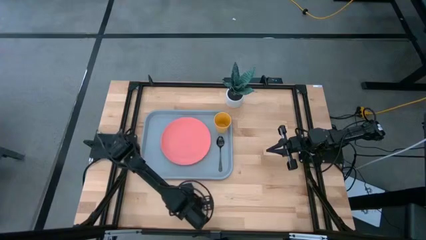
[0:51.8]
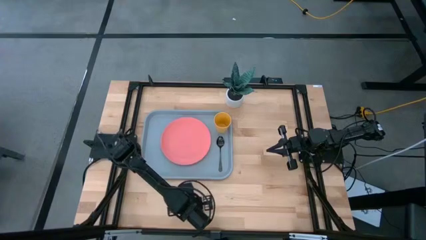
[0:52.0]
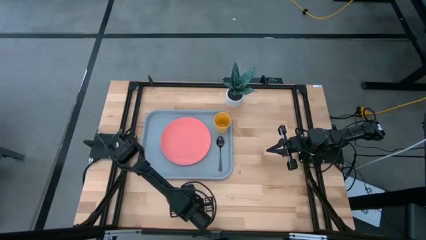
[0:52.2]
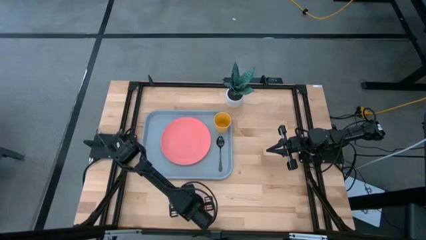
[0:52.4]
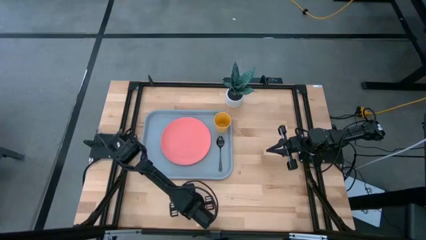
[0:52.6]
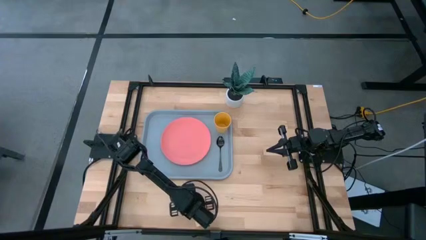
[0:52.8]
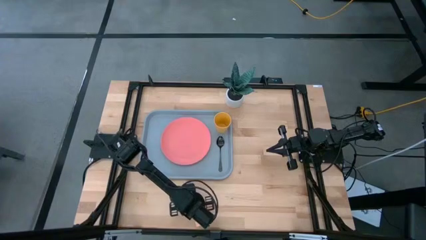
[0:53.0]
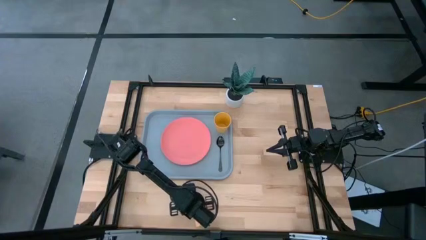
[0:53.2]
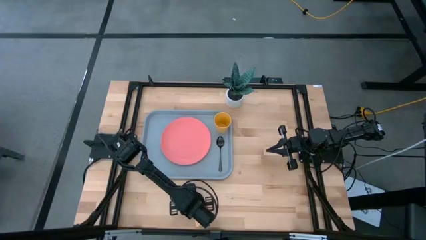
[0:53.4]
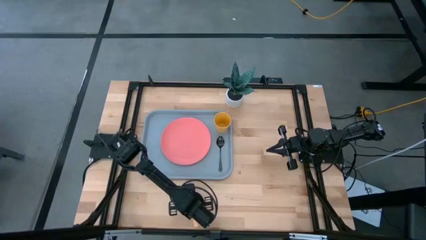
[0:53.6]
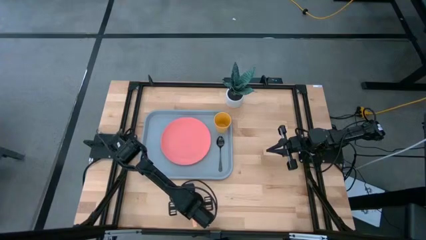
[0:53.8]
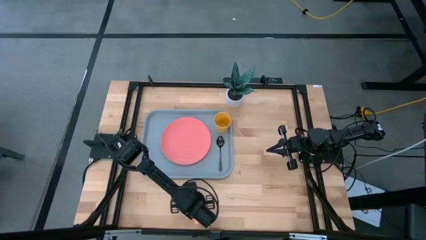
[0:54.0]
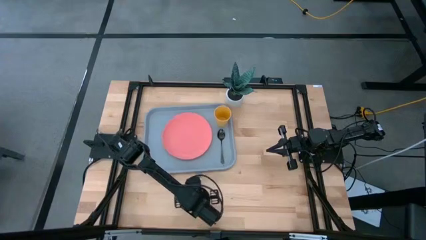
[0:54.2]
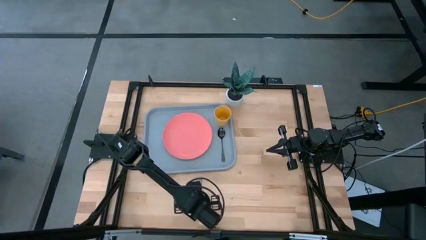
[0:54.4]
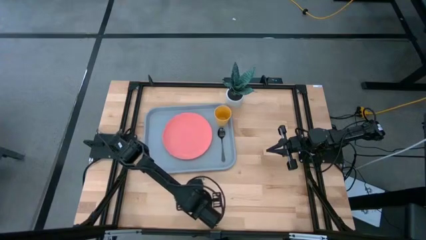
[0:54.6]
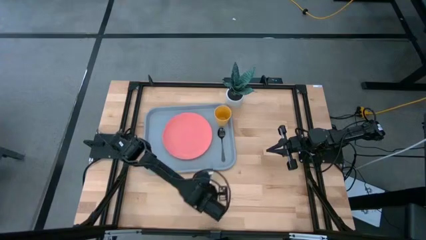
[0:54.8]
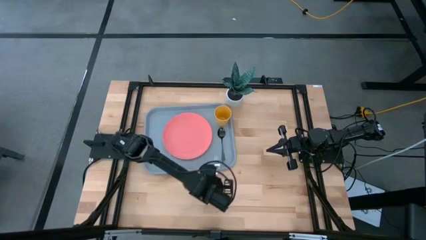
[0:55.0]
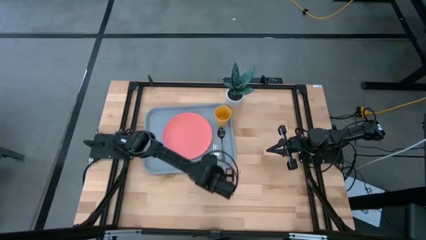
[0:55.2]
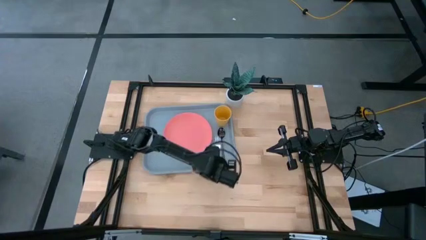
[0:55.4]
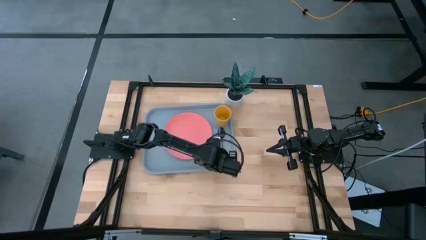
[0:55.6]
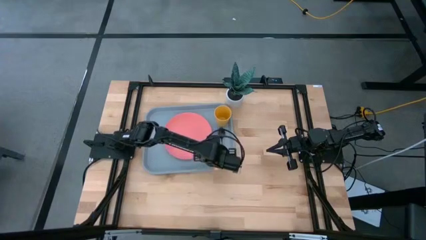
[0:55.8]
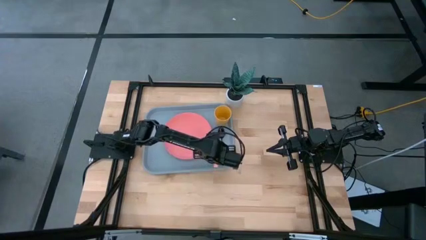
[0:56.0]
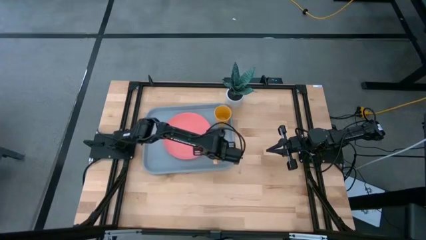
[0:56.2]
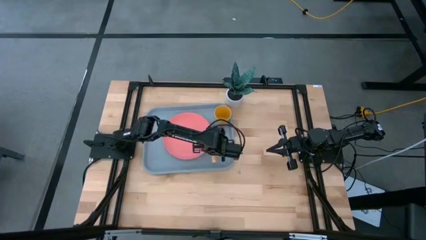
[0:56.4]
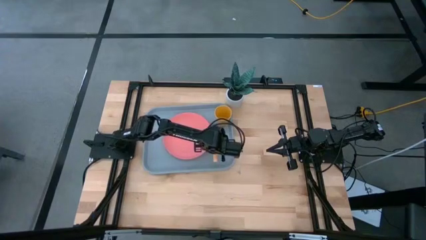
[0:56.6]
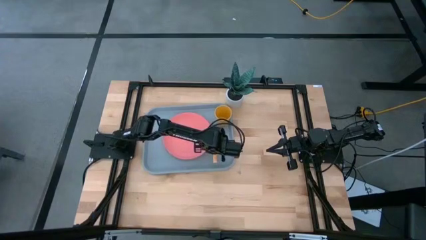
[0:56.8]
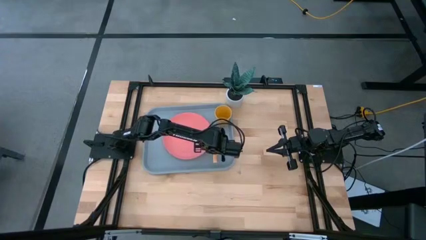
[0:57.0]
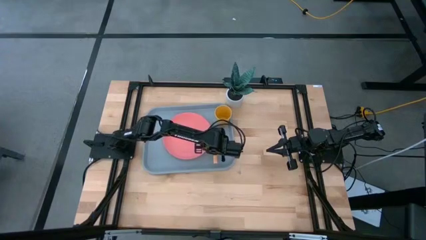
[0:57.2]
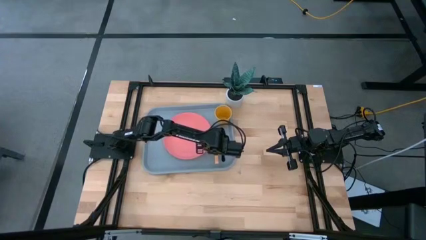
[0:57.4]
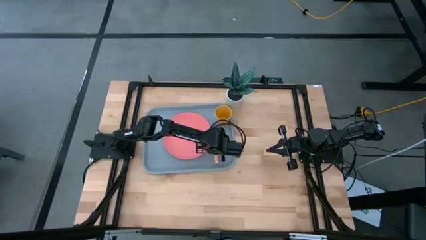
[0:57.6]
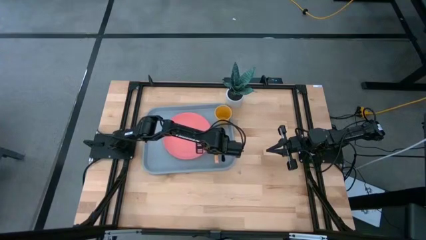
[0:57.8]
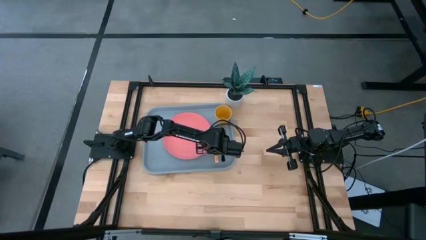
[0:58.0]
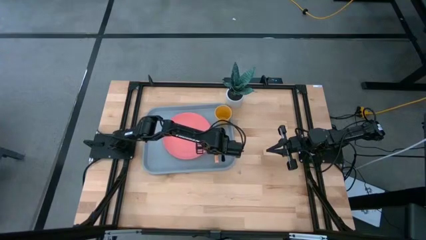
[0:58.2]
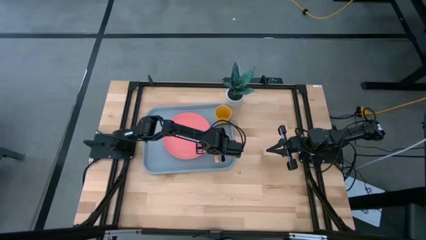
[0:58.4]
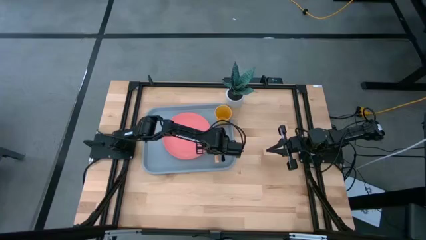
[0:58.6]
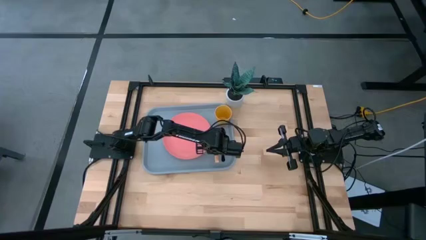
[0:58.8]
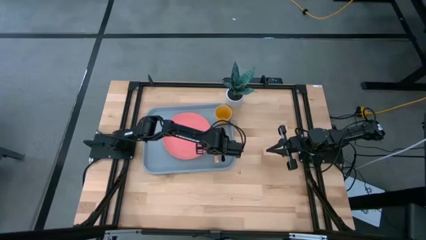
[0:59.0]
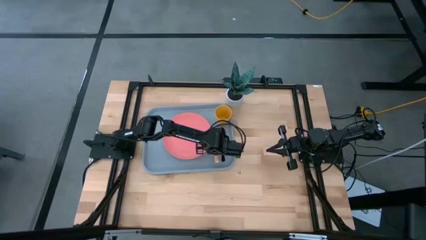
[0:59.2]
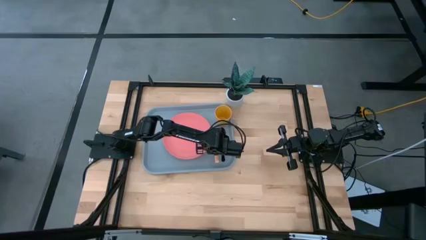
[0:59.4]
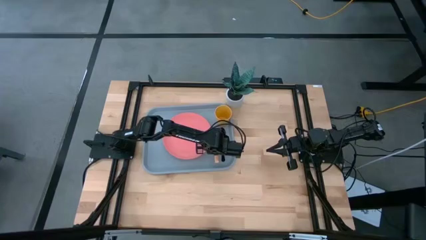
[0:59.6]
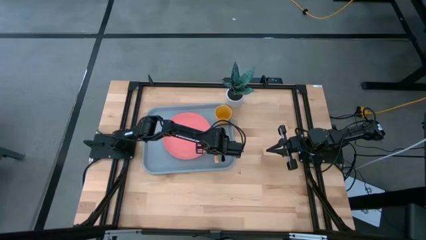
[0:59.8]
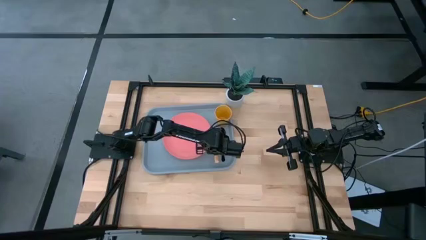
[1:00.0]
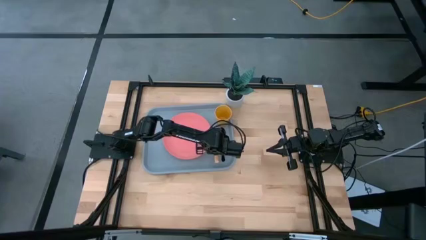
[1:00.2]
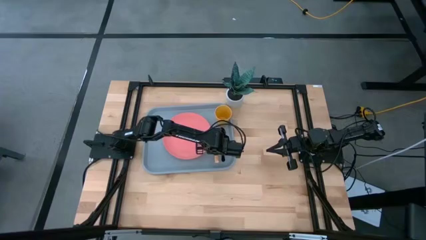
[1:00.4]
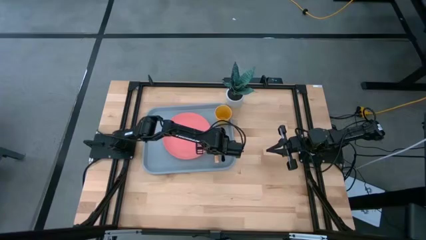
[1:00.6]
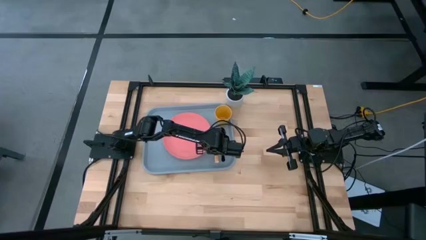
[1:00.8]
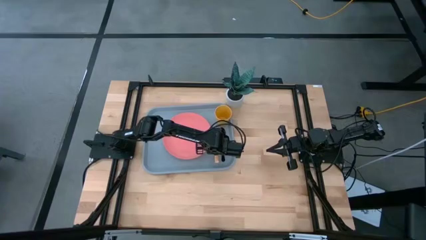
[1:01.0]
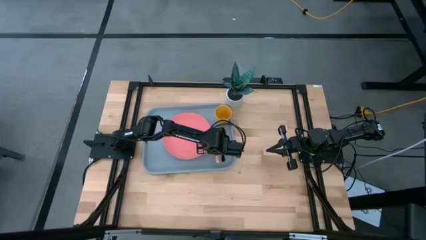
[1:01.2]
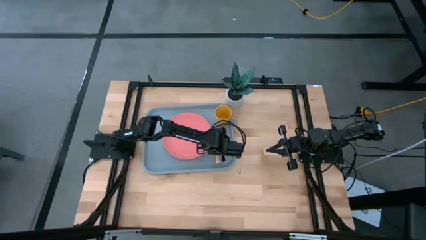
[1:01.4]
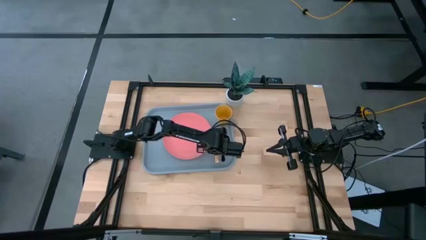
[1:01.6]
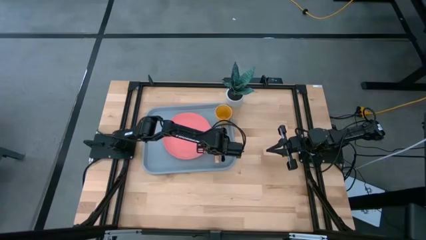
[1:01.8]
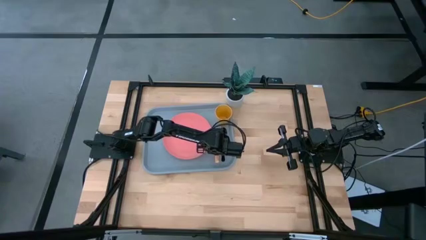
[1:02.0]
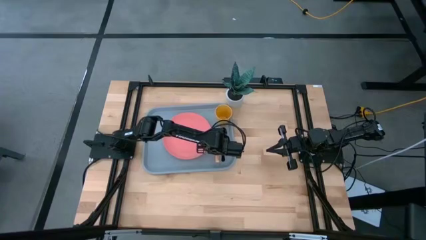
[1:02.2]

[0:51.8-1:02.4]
Task: Pick and place plate/cup/fork/spoon on tray
Put the yellow fork on the gray tray
